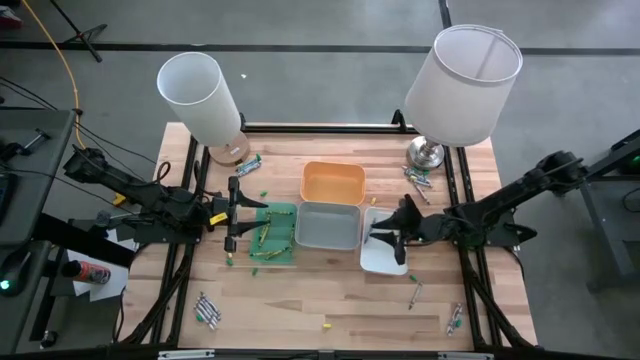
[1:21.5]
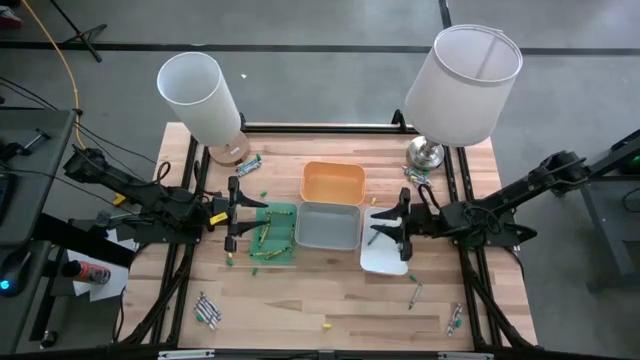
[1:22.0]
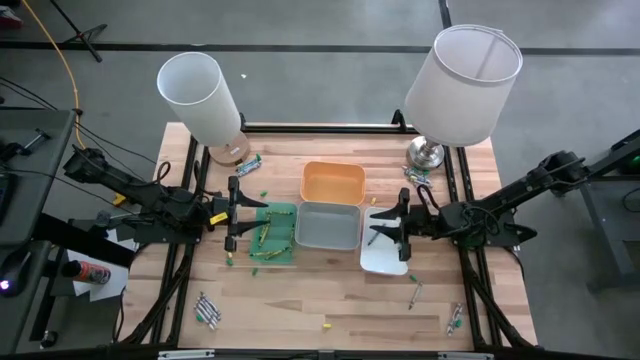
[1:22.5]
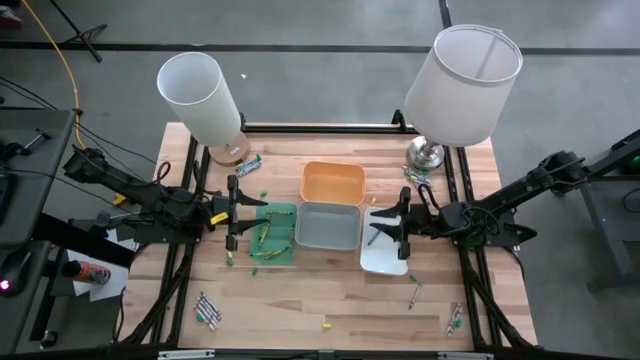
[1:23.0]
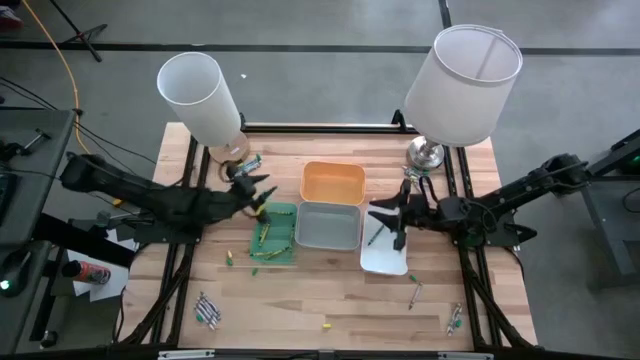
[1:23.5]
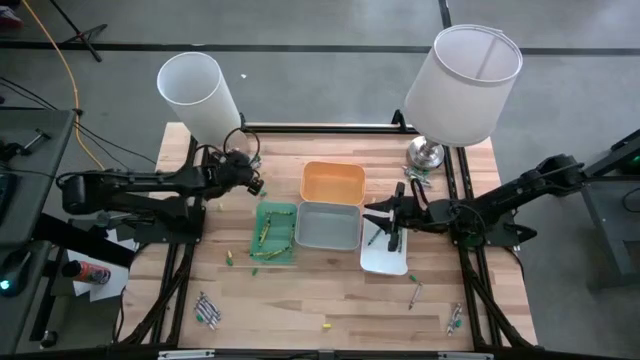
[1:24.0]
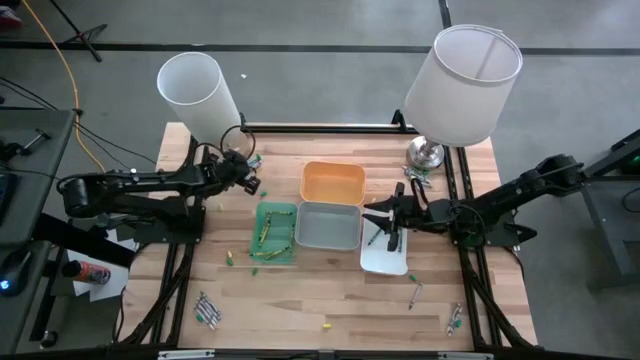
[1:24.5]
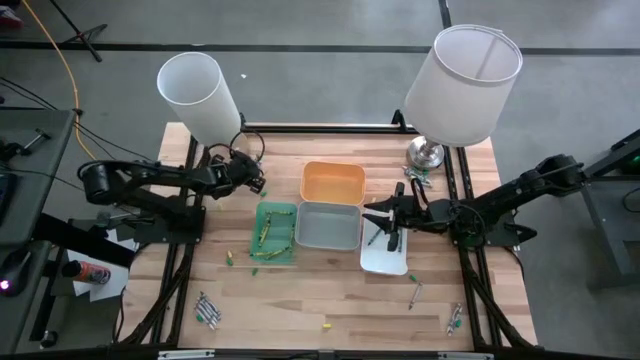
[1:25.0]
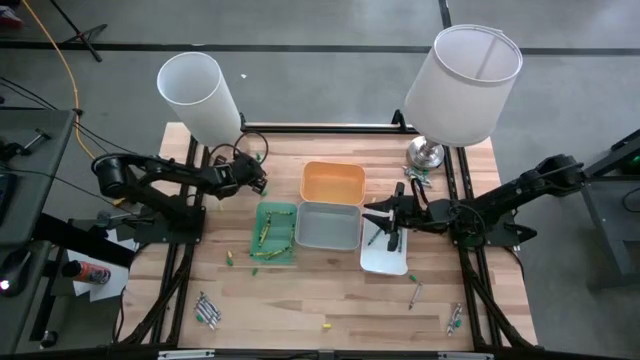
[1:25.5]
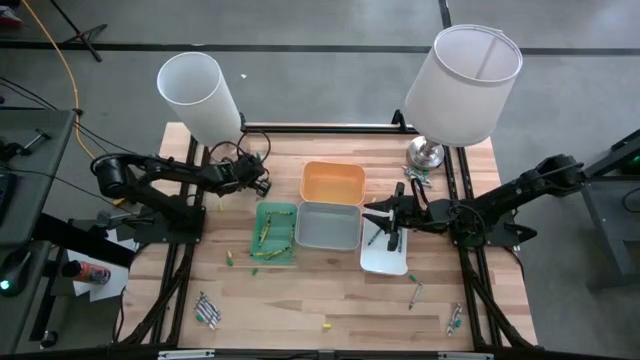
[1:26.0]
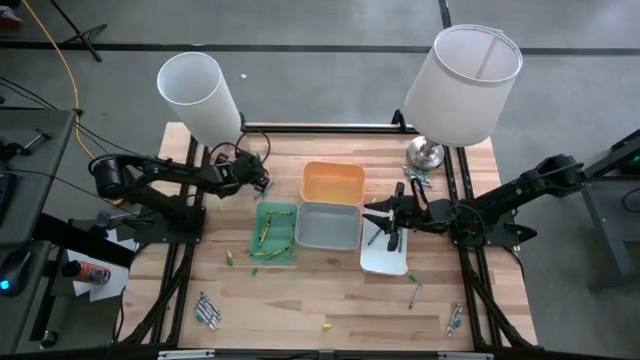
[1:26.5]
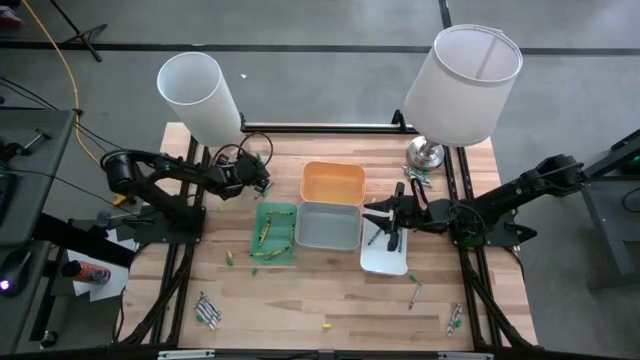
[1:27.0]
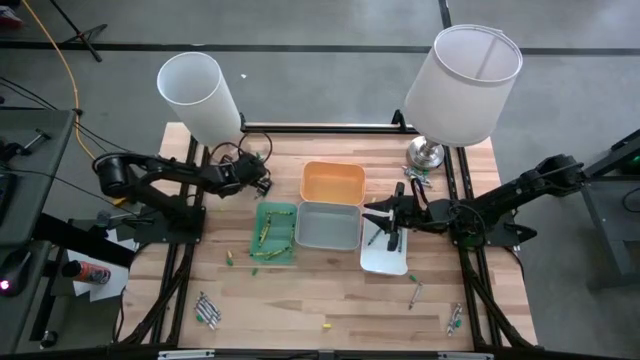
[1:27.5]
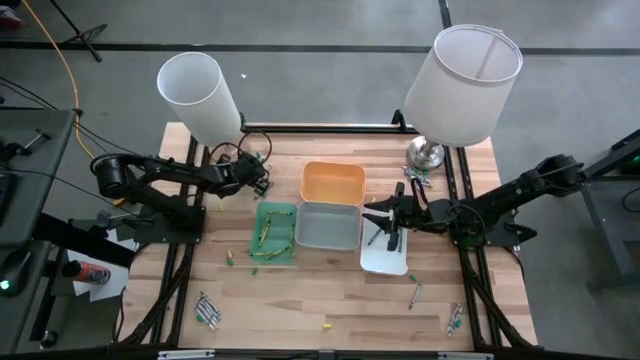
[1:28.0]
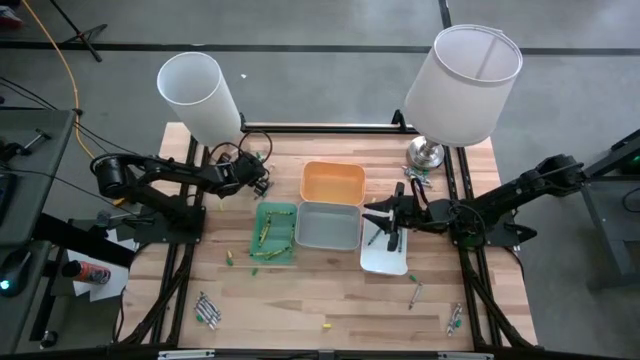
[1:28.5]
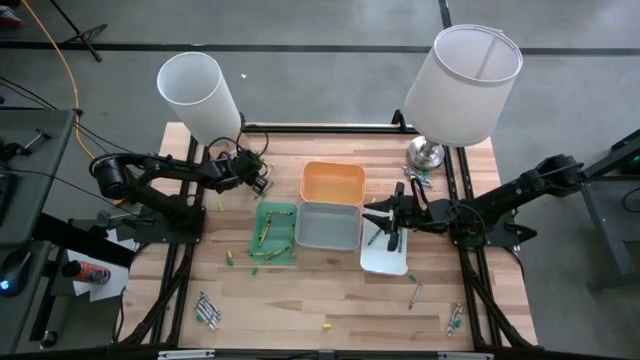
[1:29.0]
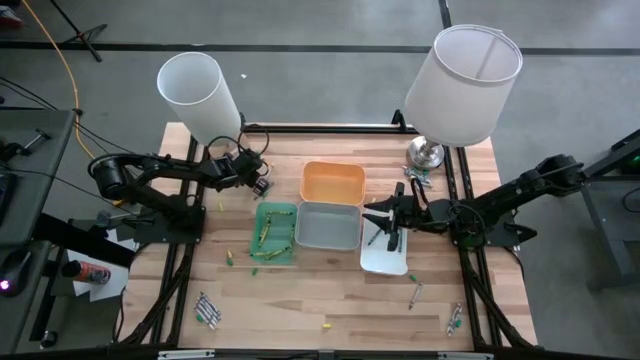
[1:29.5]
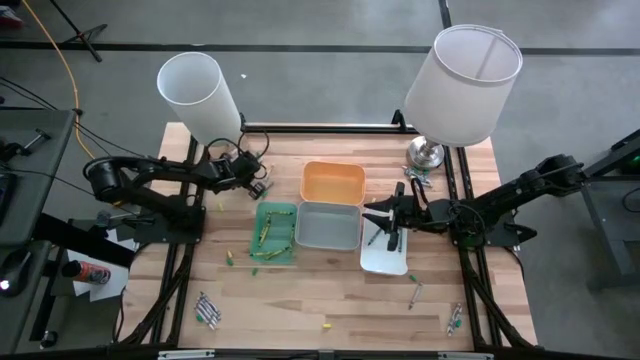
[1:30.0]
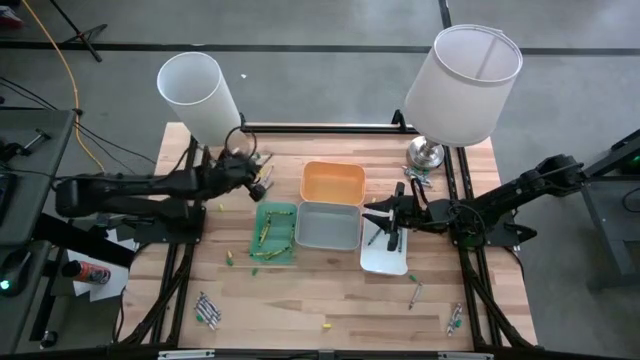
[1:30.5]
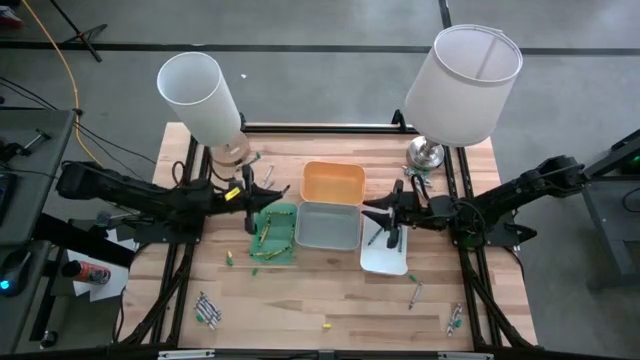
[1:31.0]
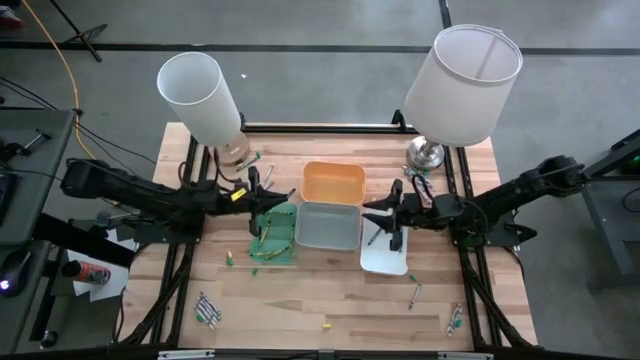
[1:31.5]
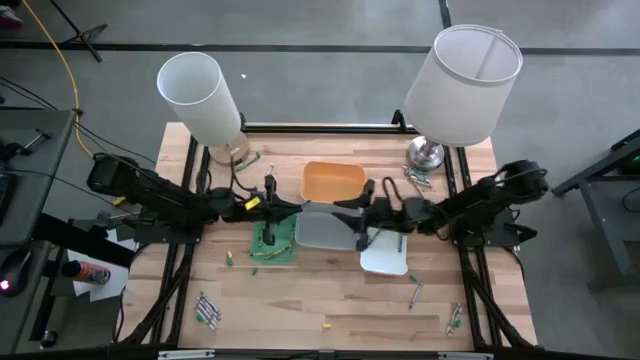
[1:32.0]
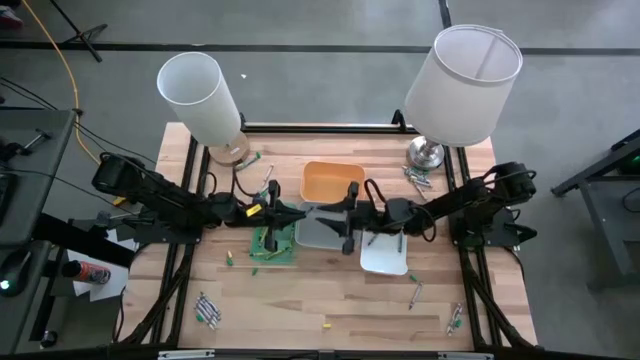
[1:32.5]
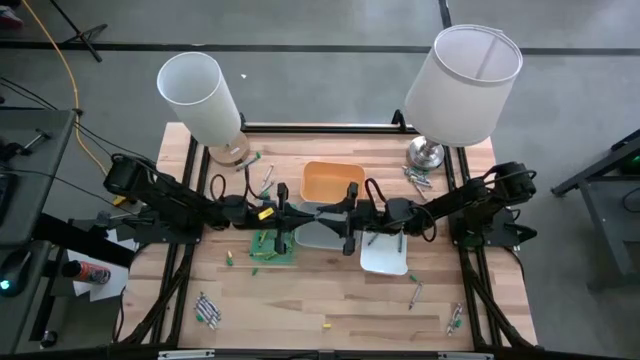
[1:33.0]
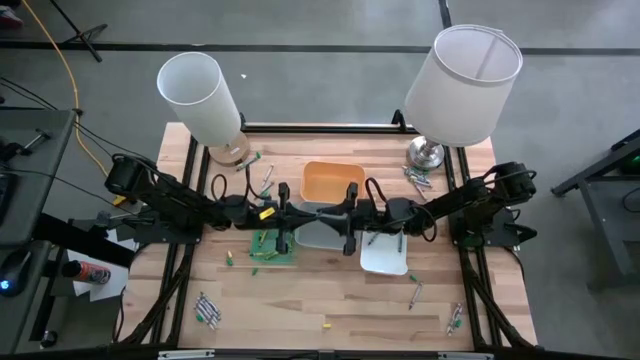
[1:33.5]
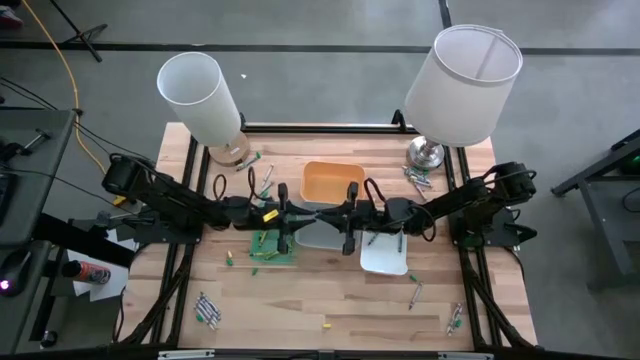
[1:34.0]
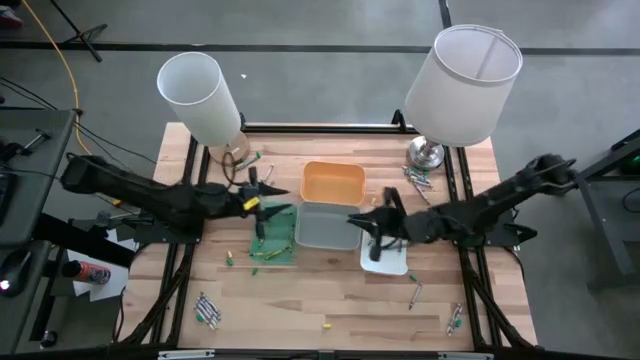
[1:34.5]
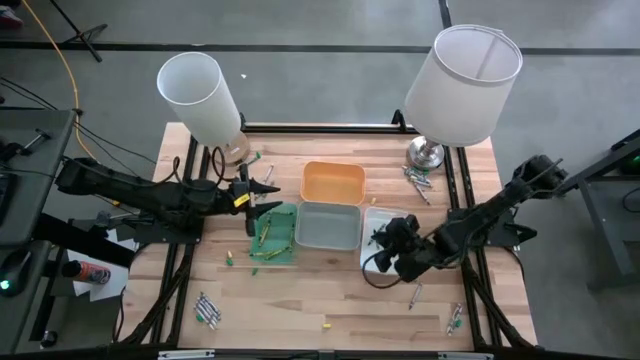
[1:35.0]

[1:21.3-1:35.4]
Task: Sort crayons
Put the blue crayon into the white bin

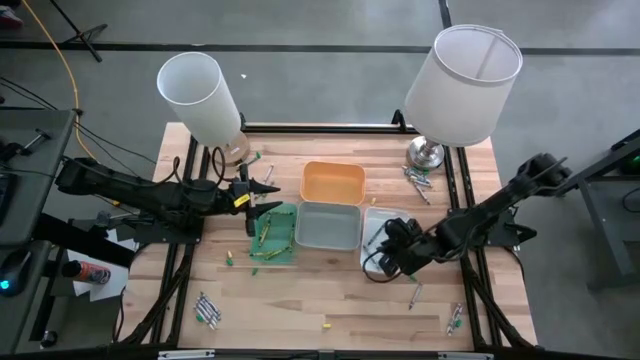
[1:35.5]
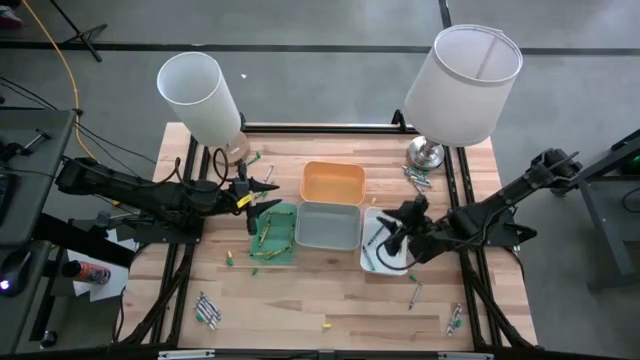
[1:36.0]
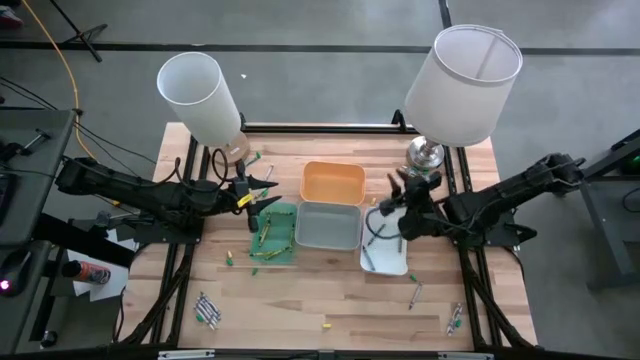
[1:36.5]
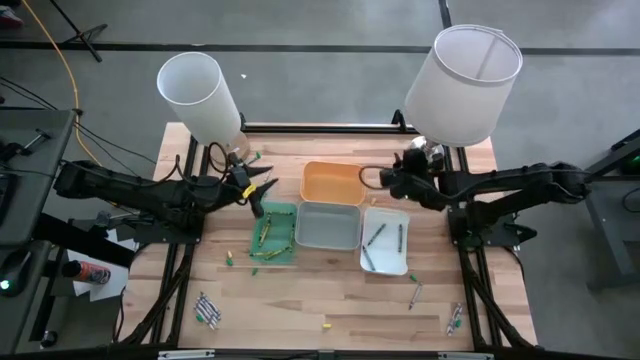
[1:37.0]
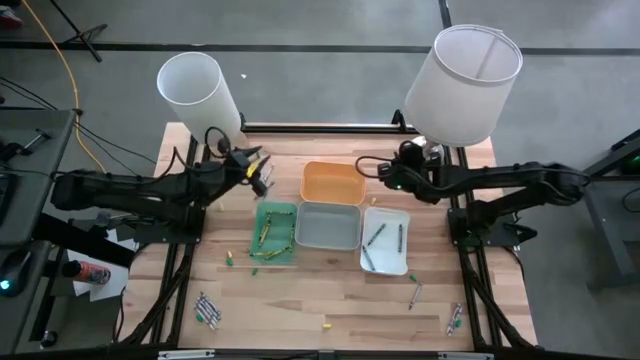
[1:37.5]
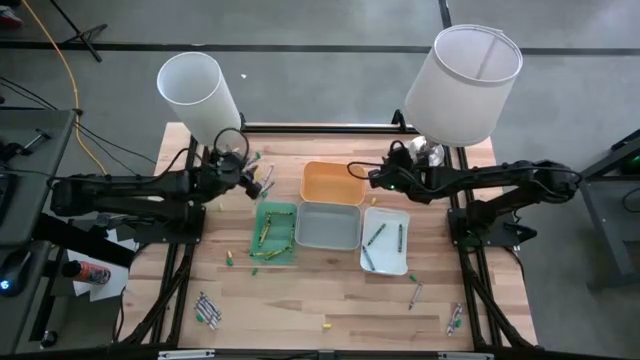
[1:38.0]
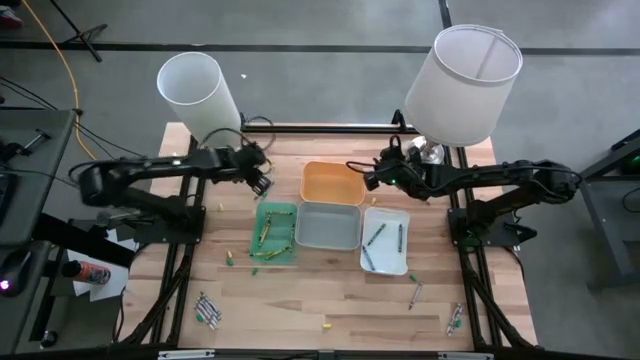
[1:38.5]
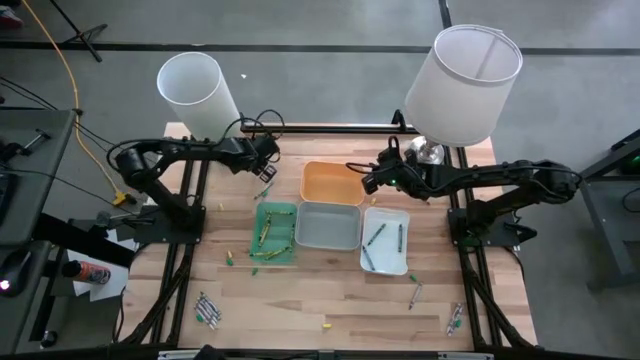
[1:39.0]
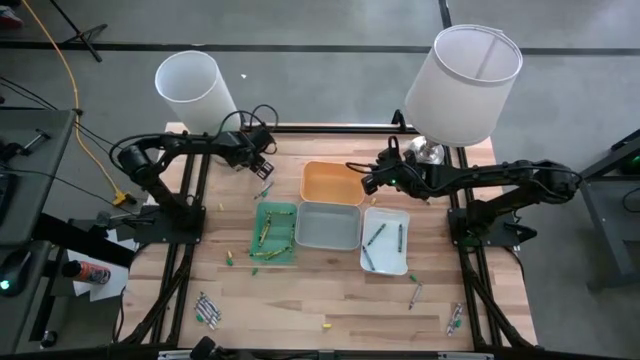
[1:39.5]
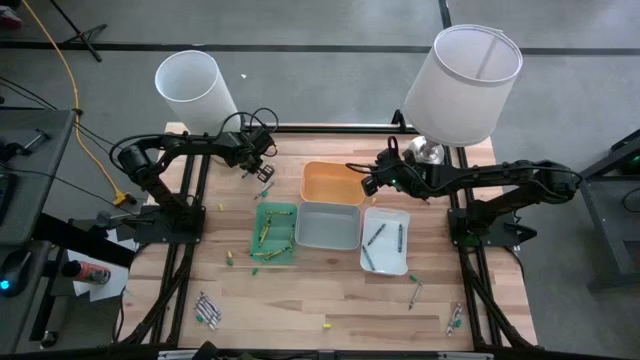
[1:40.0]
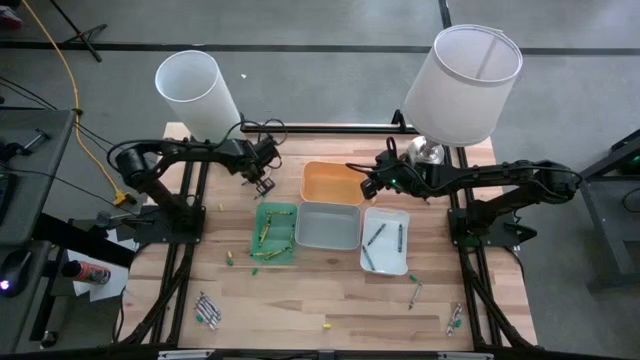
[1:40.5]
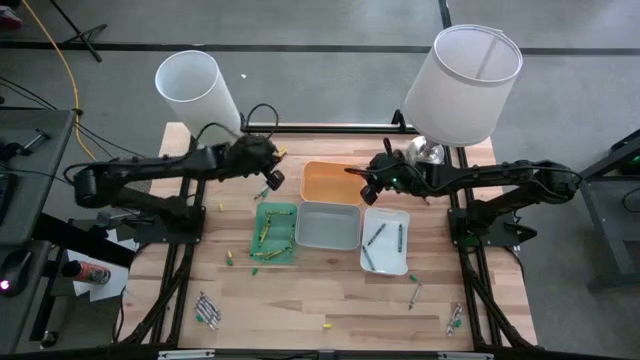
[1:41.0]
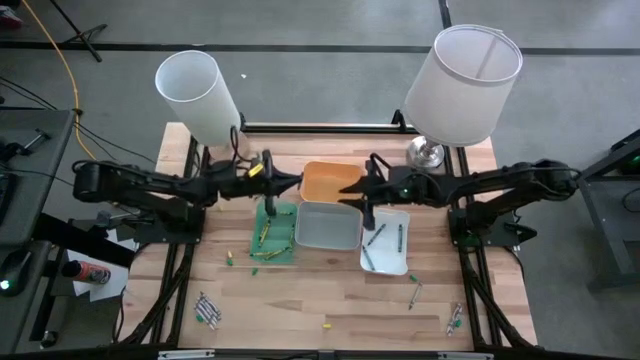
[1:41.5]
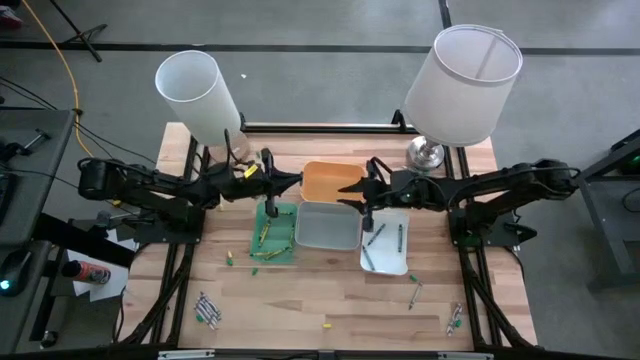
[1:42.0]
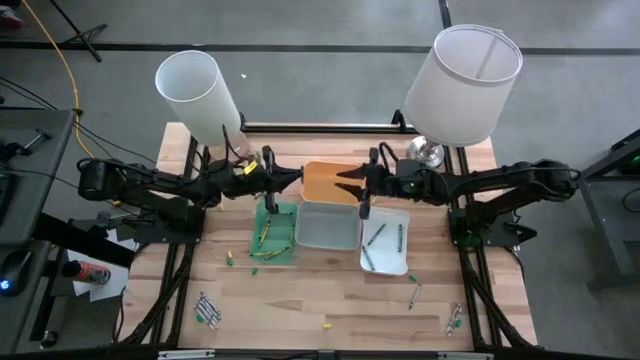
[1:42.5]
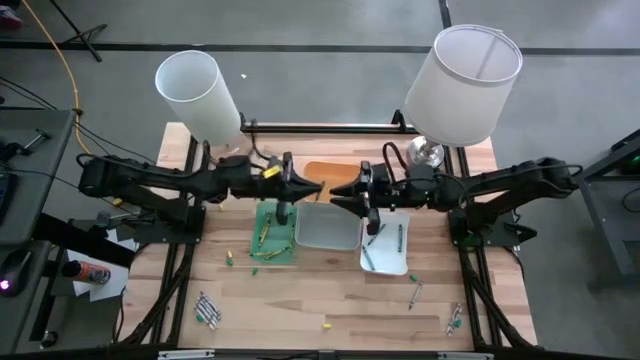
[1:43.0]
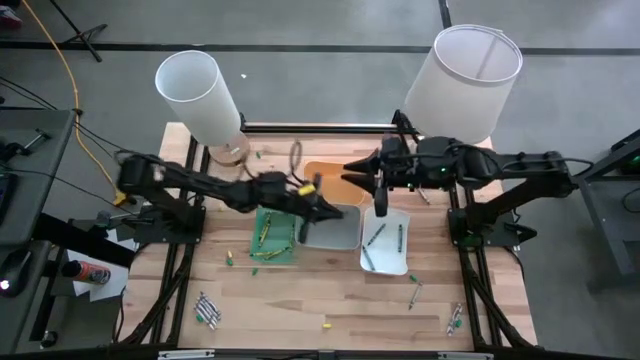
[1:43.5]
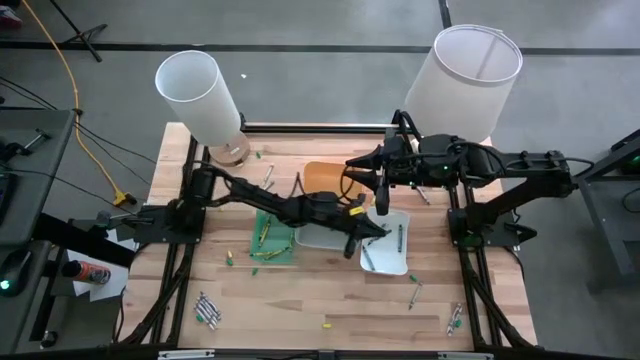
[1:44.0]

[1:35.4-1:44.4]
Put the blue crayon into the white bin
